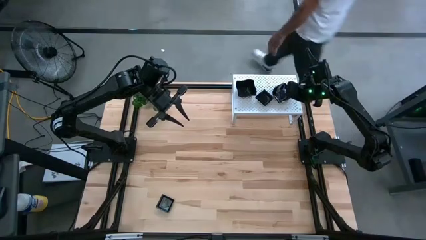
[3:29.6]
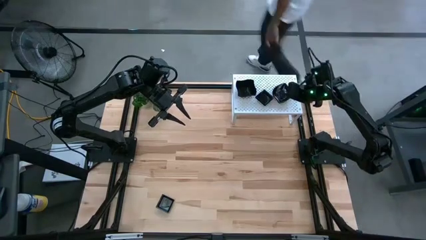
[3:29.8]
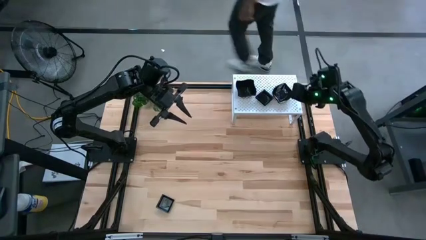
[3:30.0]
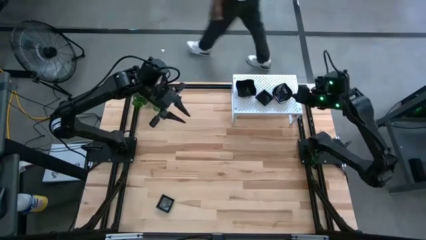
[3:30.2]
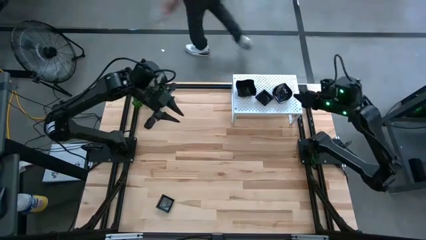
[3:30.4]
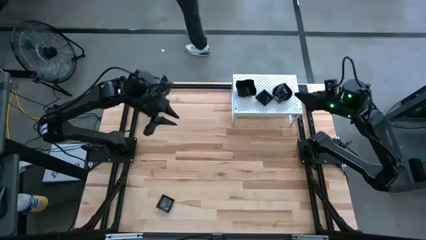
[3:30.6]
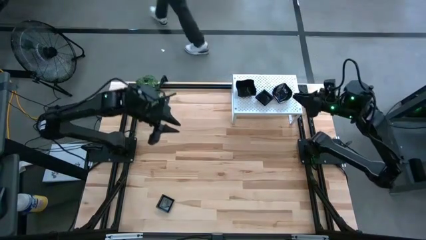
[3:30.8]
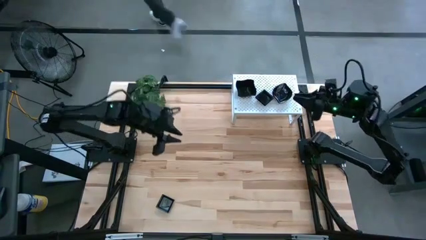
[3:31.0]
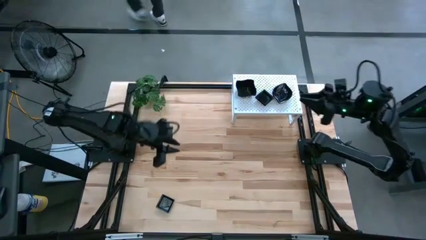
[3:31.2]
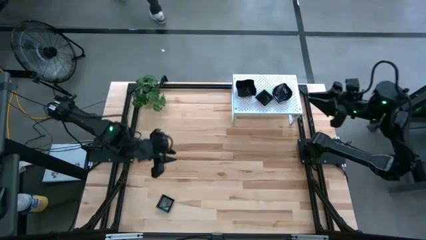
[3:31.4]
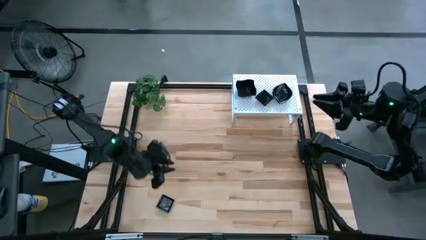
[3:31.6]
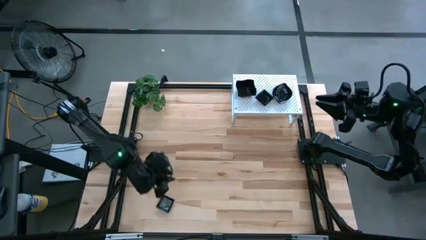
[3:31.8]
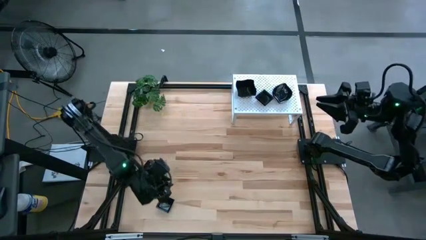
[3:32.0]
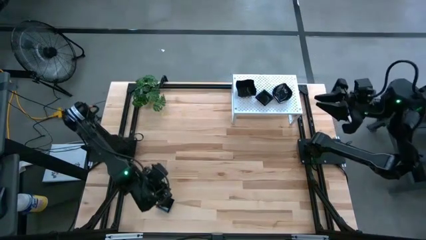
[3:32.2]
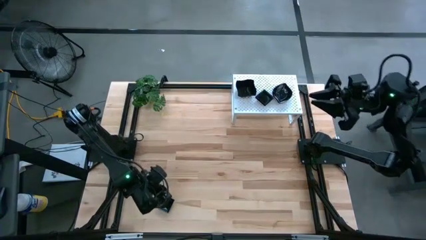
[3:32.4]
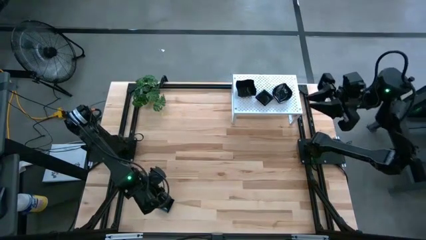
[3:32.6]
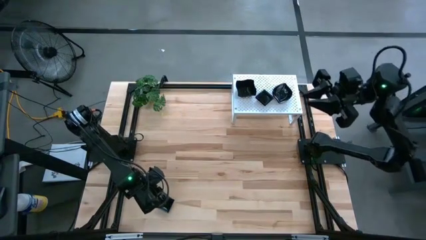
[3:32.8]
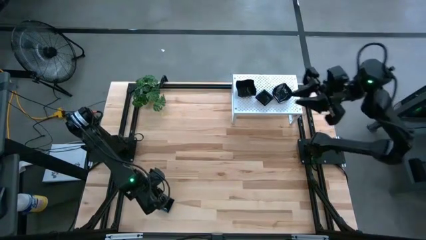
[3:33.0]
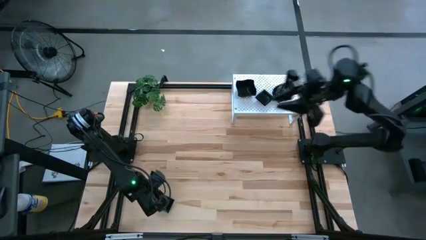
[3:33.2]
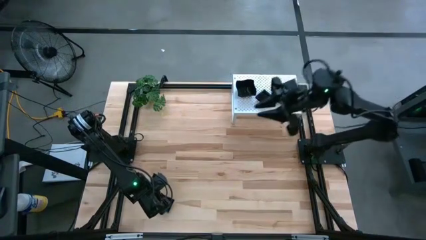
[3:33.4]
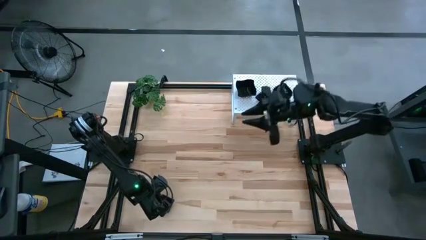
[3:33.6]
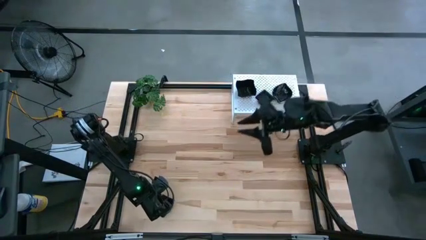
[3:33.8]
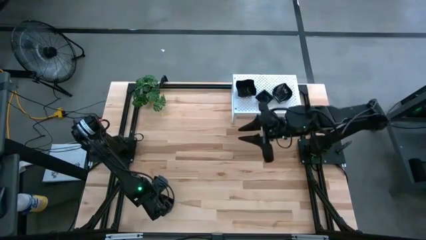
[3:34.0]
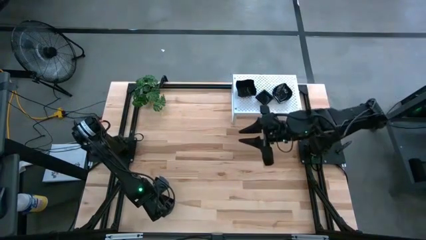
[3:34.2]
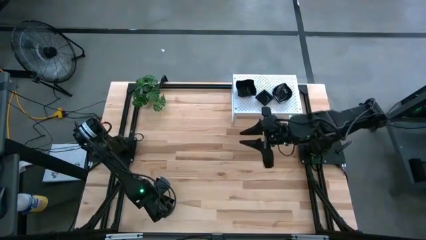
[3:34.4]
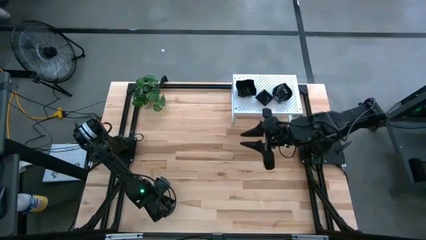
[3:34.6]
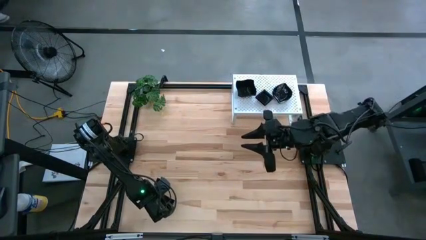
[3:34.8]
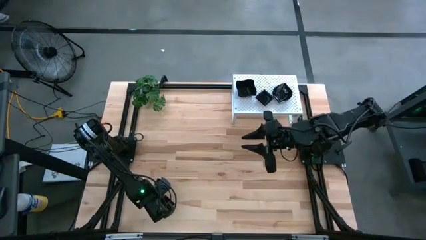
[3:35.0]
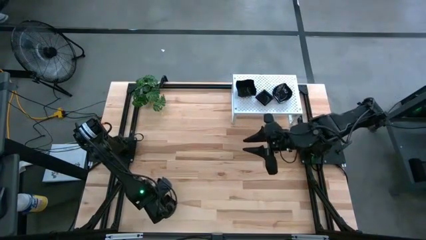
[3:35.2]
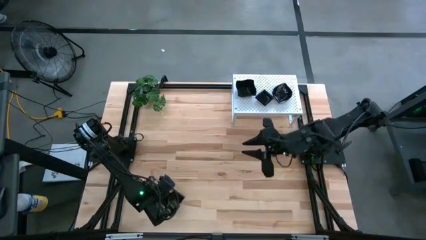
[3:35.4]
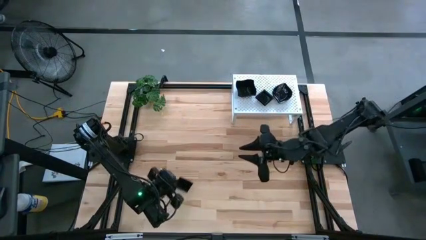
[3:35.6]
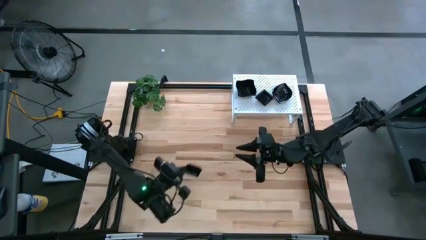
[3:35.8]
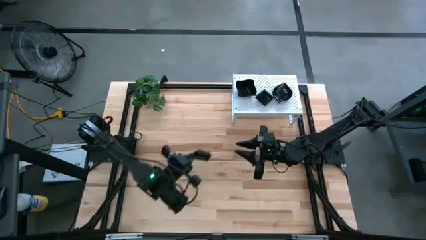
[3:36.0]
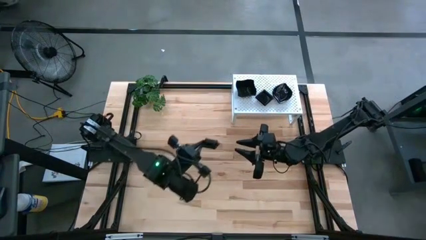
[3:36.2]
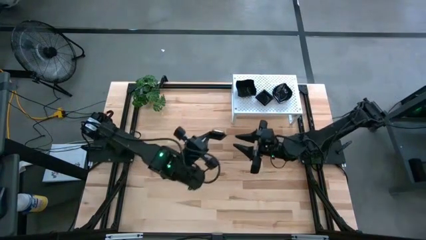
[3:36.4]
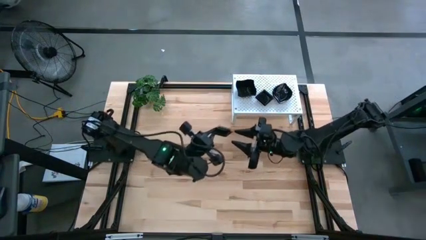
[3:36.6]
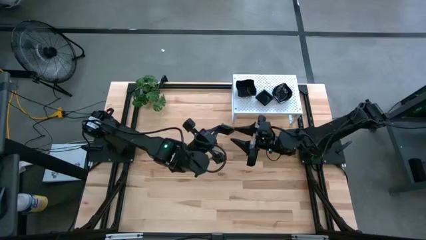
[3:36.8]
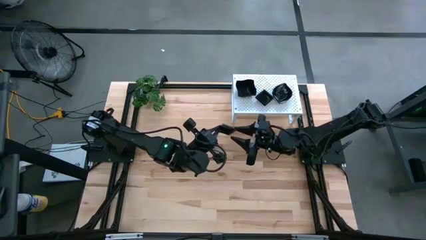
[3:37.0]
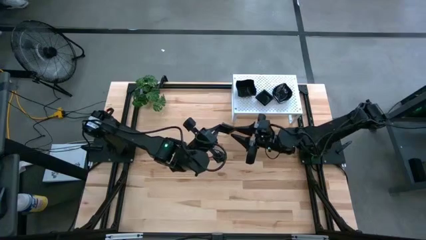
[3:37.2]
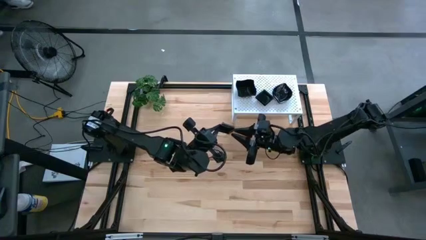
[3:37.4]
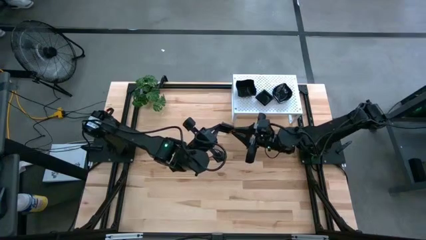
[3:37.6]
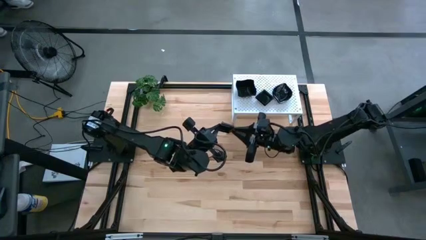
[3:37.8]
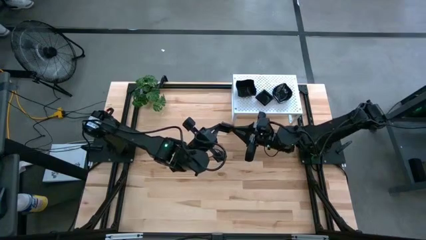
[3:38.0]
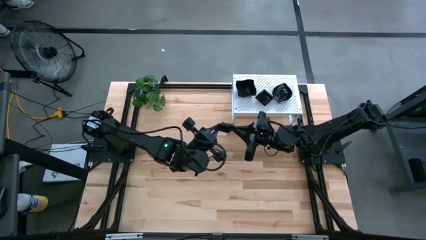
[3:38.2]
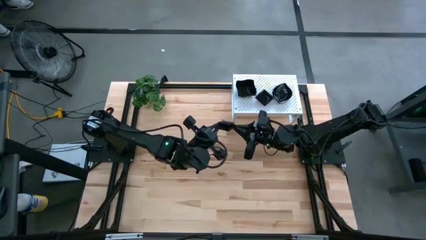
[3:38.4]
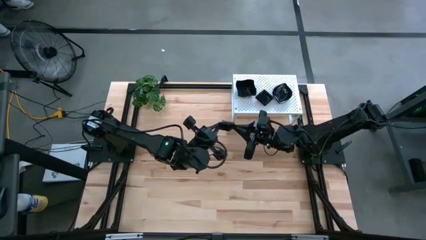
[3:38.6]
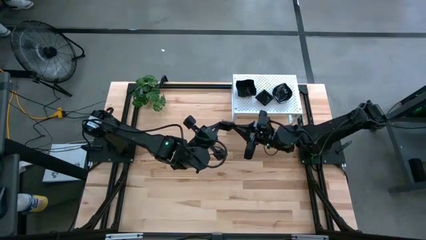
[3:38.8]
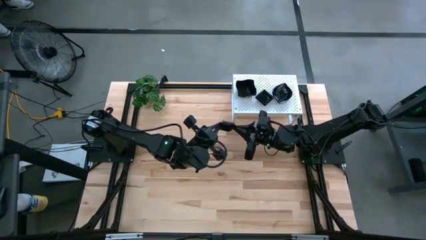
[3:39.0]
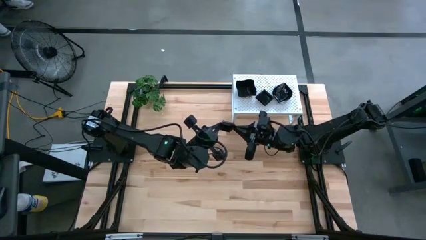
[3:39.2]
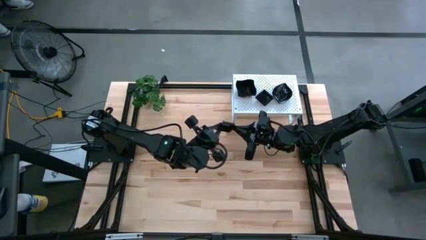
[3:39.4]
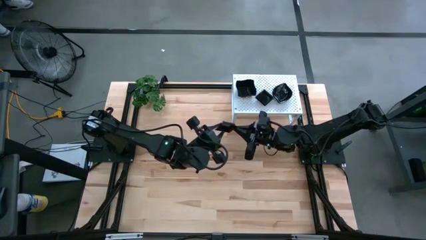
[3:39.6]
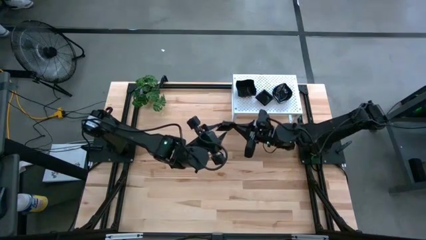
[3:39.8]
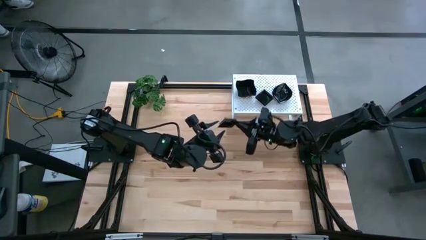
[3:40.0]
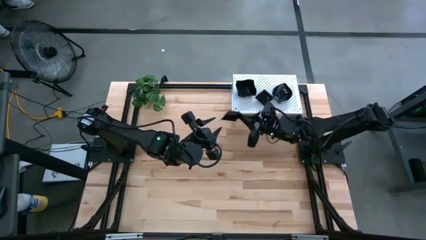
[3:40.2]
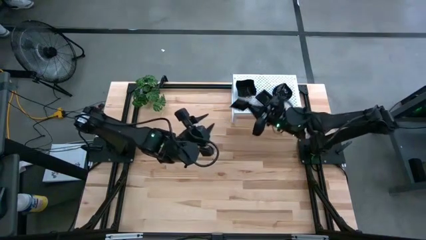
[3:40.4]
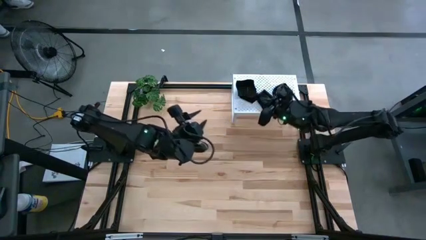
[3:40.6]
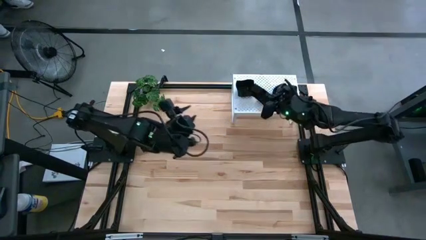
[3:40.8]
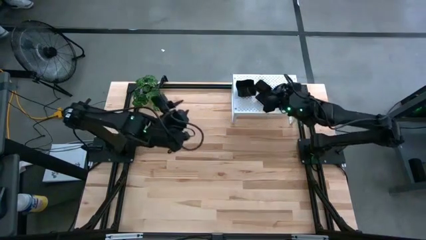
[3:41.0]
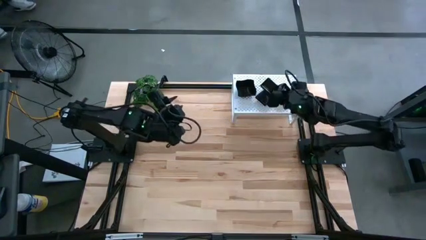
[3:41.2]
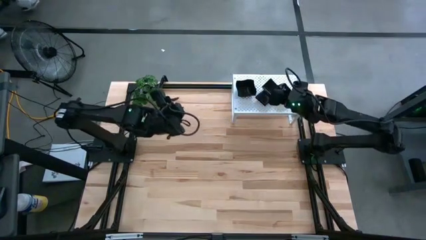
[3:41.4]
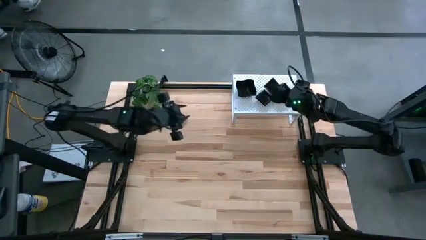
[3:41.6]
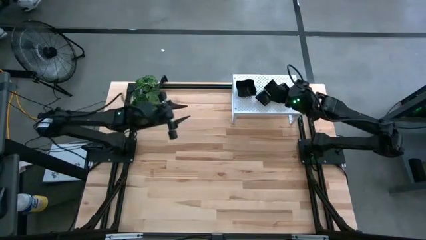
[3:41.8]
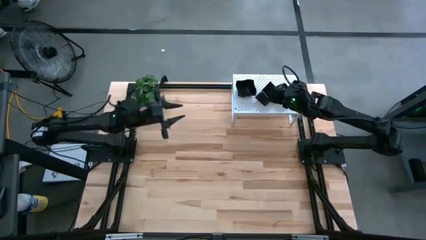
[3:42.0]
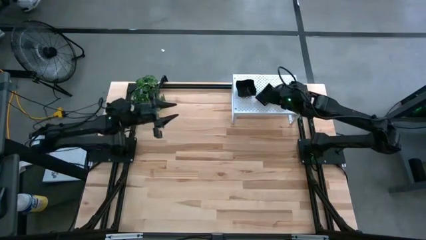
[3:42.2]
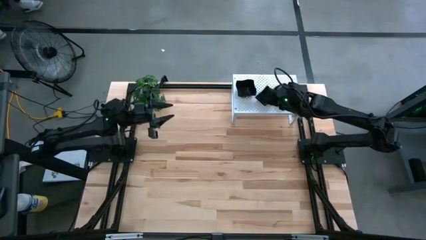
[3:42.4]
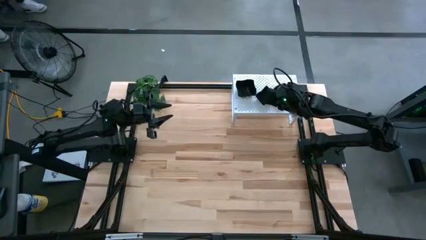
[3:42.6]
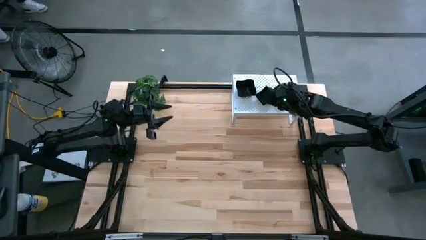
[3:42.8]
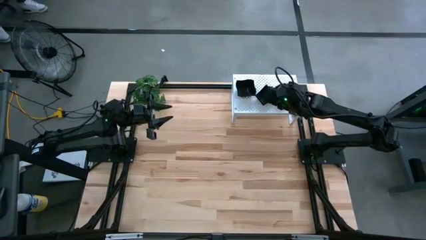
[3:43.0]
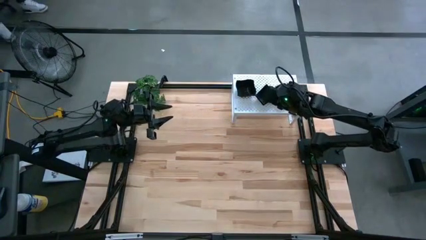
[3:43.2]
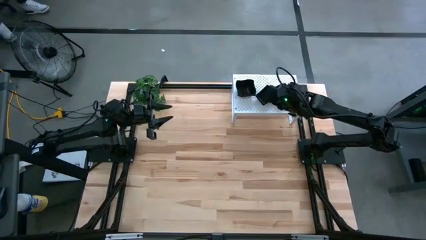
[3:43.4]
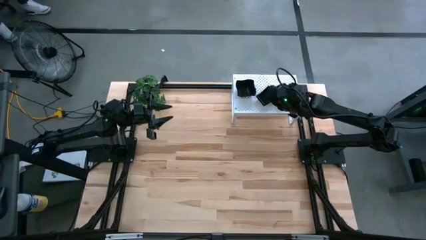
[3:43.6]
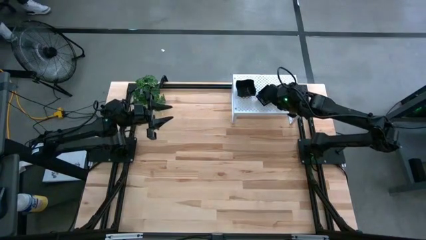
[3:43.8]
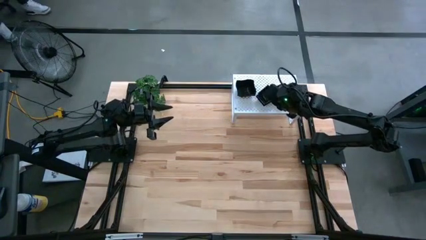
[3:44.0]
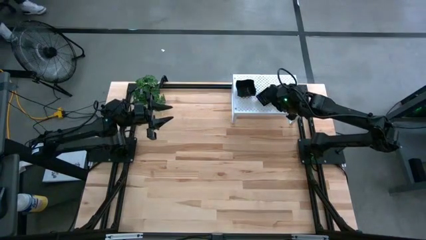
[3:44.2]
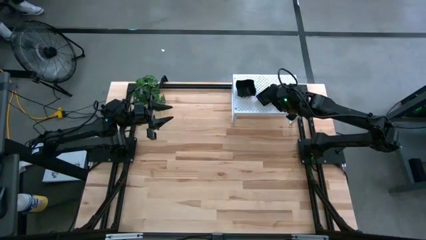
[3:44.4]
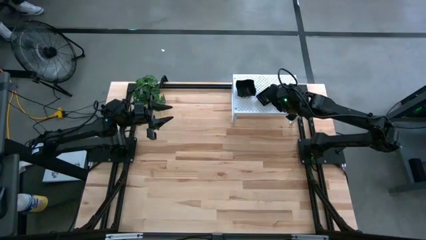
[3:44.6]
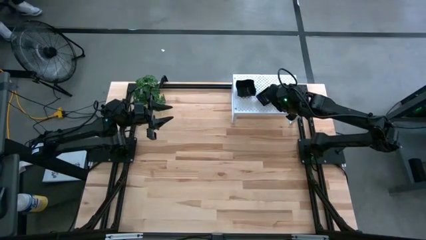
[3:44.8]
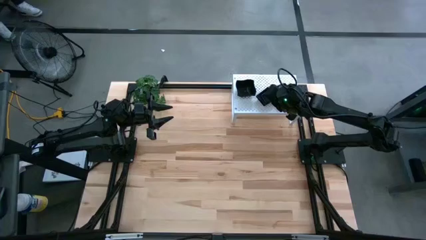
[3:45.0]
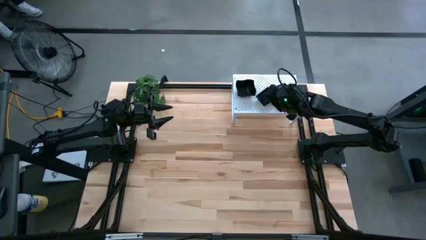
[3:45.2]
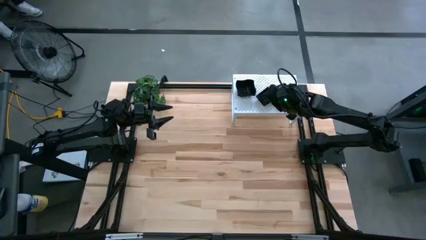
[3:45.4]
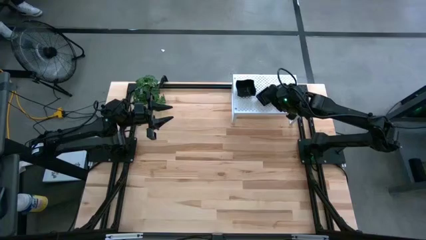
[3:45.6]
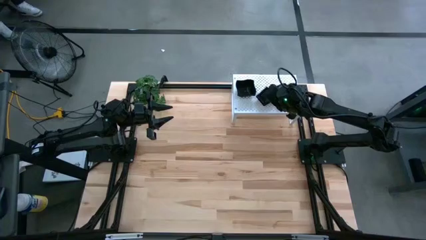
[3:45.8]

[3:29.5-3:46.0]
Task: Pick & Place Mini shaped plates
Stack the square plate on top of the square plate on the shelf
